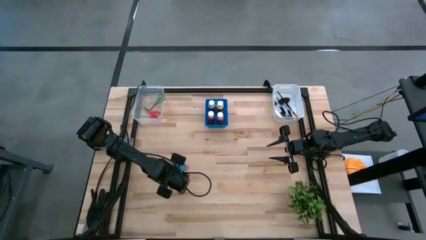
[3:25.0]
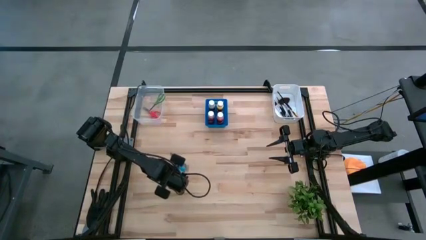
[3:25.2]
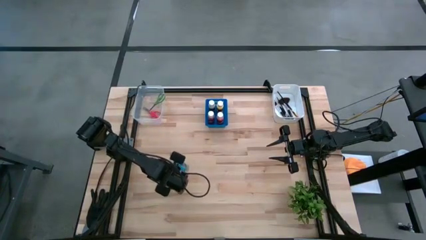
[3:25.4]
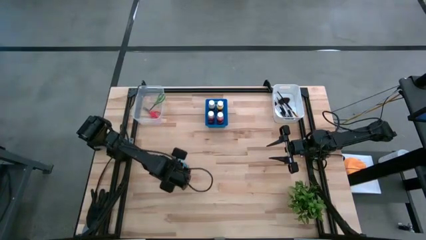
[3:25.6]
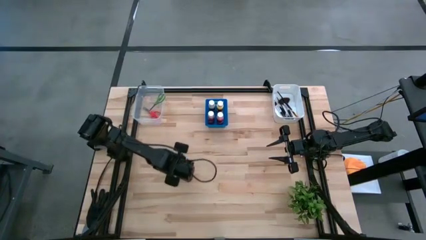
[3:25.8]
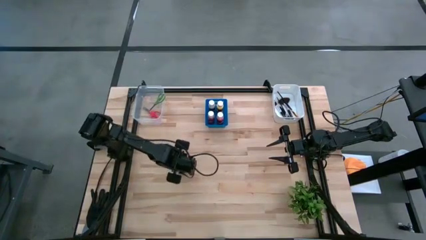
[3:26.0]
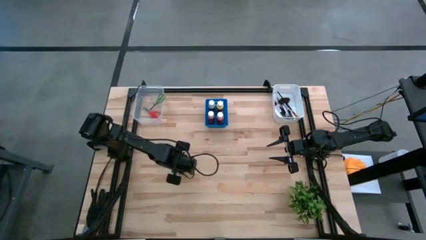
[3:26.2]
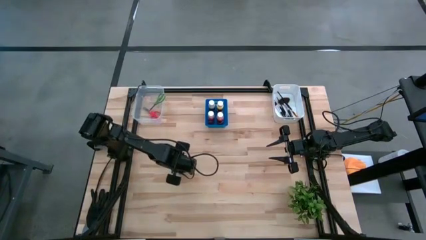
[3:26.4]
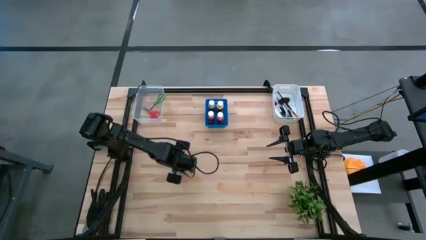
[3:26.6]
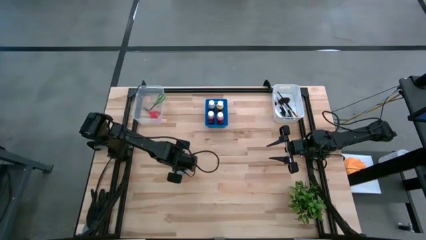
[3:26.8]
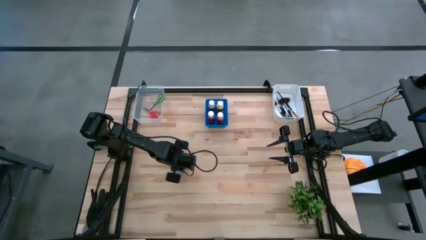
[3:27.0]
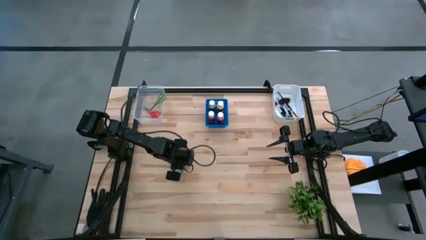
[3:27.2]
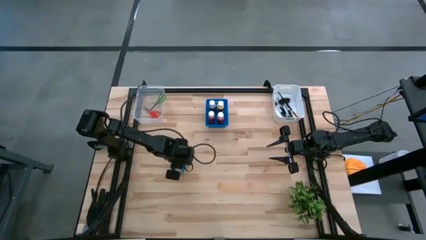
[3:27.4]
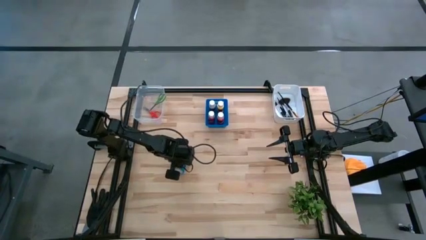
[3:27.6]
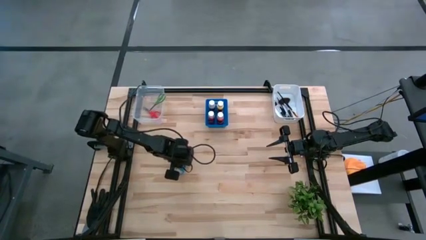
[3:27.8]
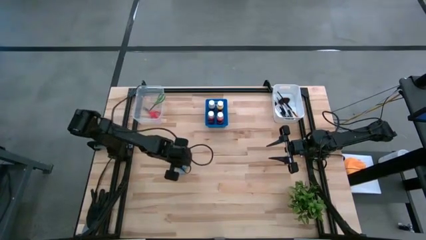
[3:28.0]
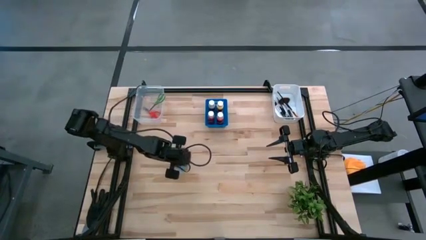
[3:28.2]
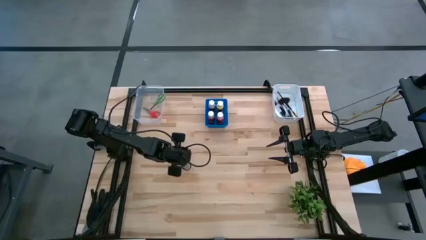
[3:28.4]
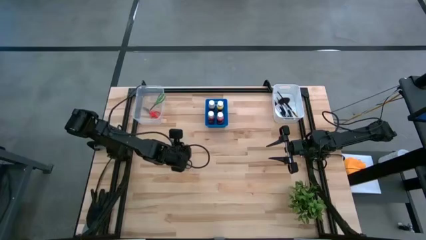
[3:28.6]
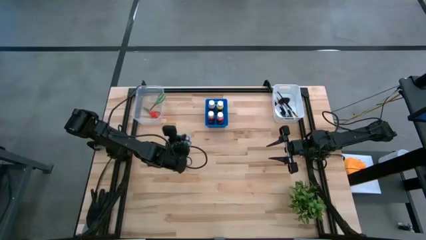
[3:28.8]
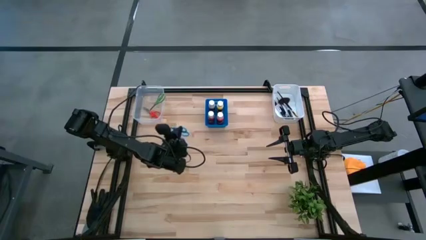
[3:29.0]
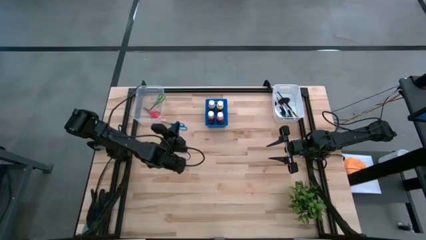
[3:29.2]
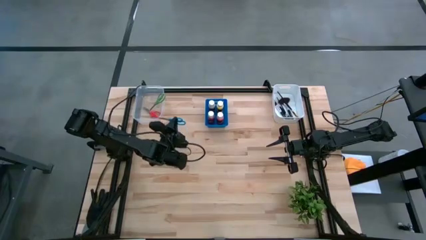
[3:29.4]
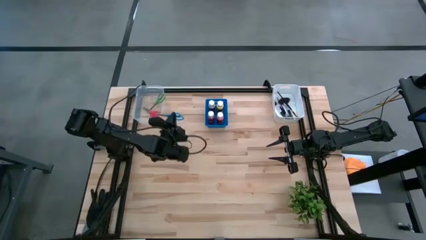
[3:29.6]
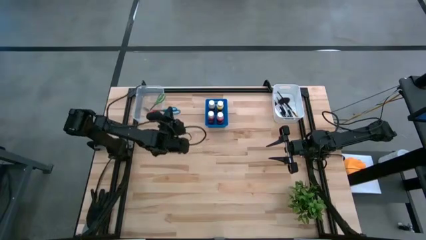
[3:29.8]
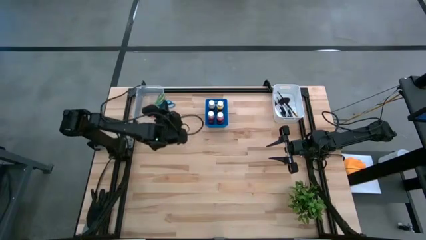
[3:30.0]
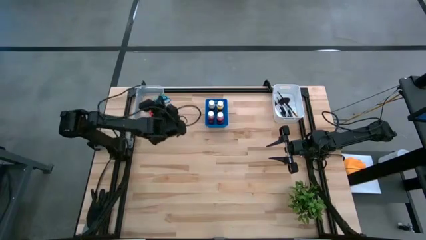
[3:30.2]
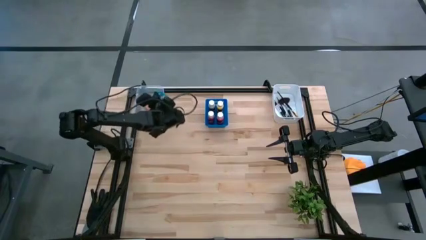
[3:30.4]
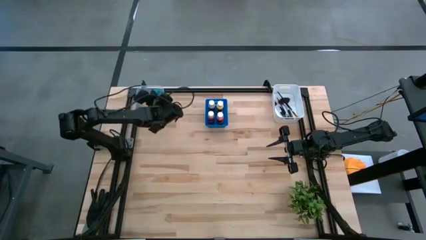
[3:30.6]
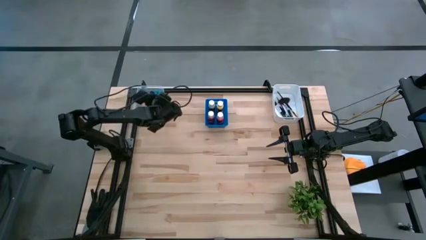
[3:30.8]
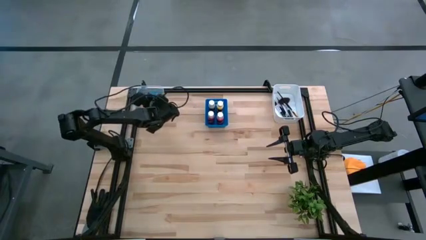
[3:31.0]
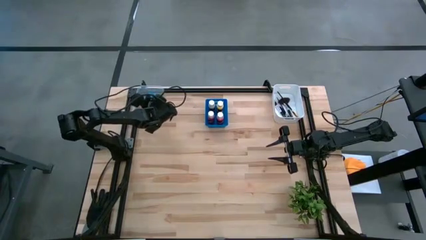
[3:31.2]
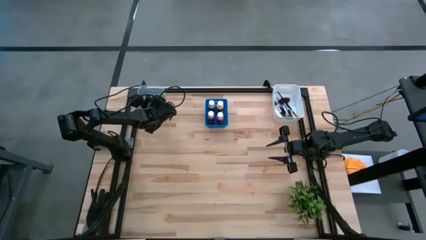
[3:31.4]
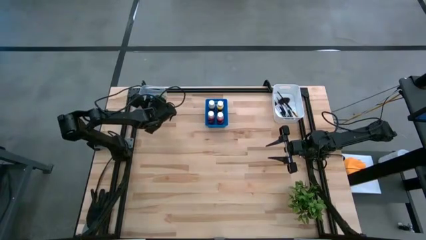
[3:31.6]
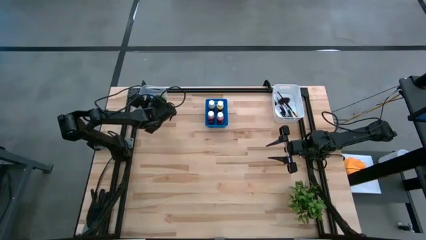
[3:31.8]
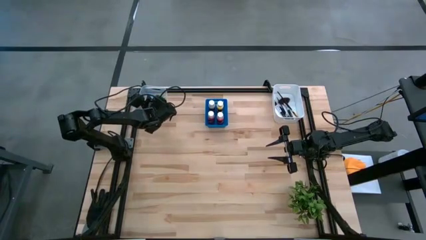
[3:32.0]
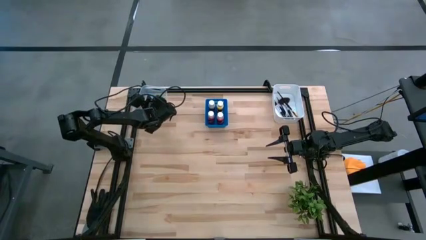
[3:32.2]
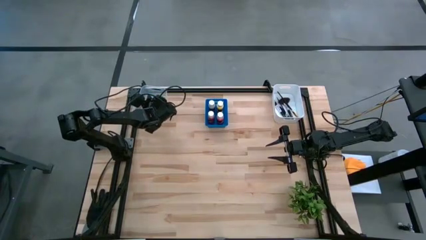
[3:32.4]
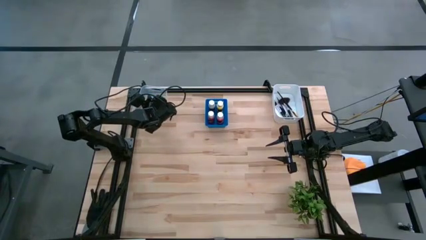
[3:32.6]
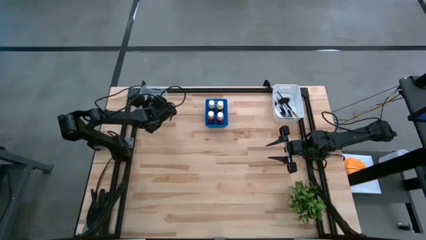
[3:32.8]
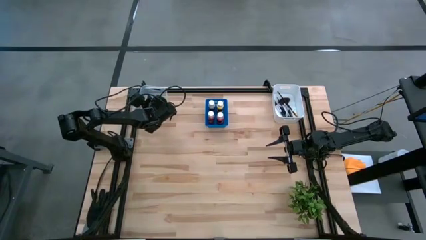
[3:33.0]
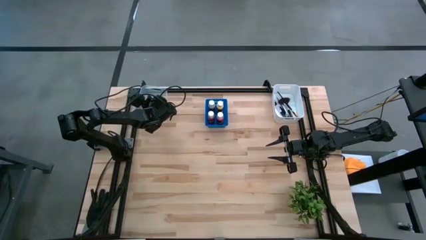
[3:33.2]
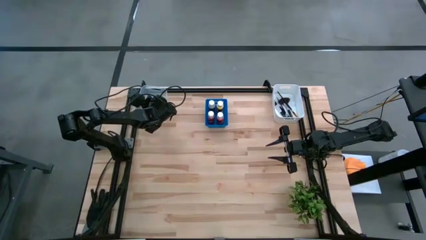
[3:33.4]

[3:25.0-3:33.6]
Task: Pick & Place Paint Supplies
Put the blue scissors into the transparent bin

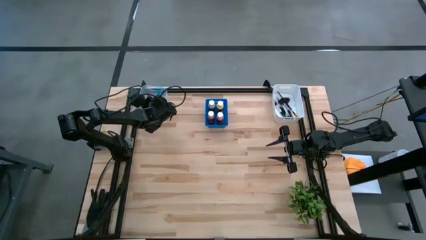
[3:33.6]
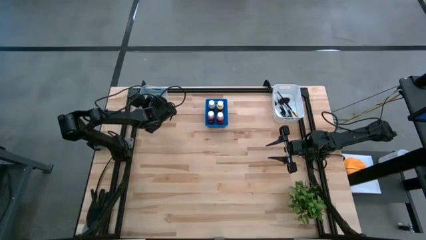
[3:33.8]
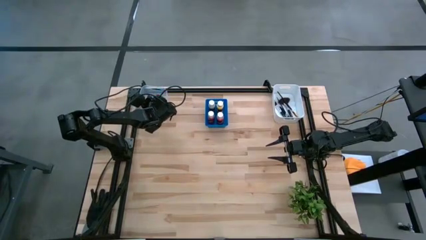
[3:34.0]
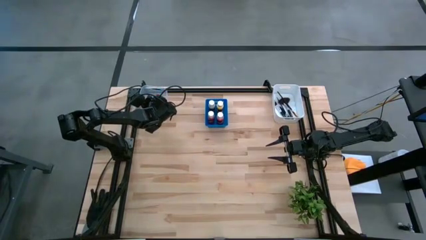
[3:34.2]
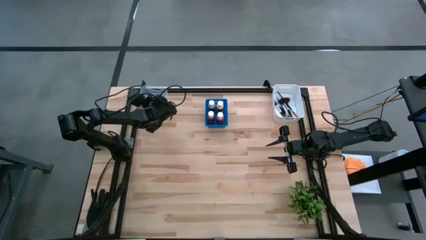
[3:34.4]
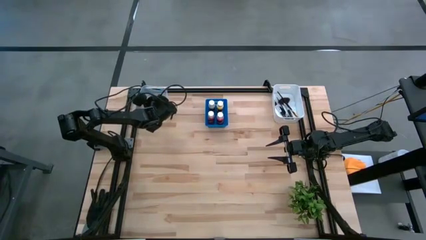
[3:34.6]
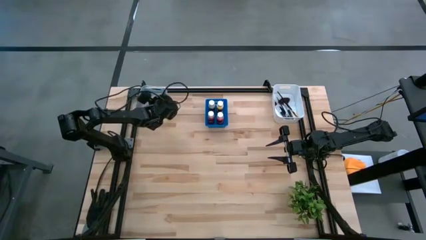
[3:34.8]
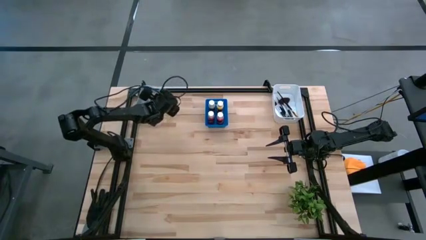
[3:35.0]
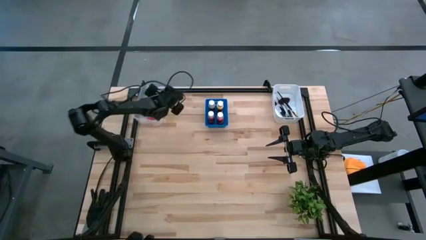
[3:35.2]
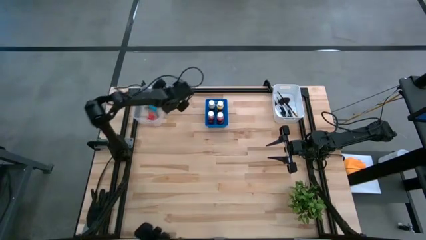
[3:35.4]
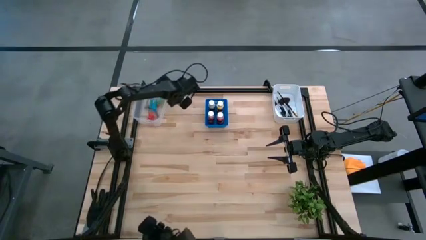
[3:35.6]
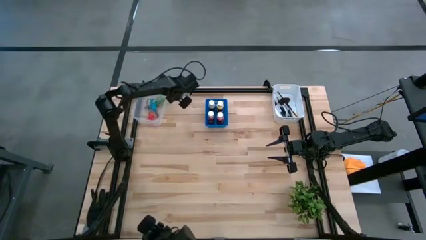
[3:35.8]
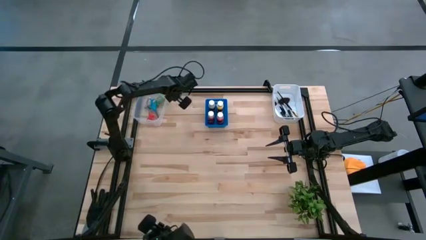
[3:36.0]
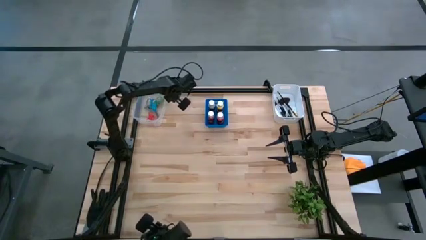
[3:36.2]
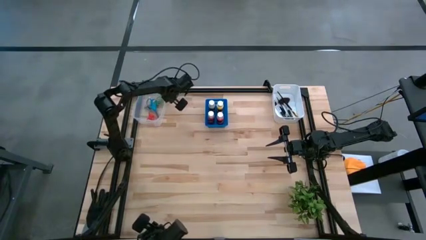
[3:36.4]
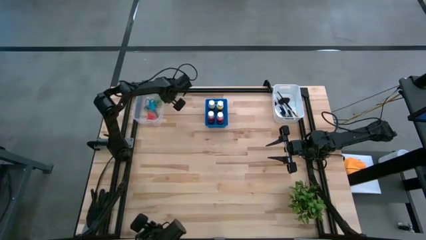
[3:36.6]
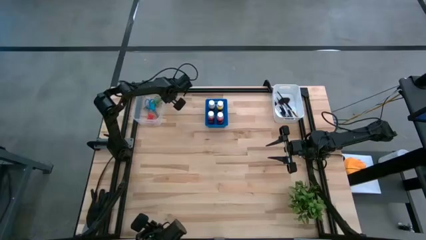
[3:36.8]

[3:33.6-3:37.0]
Adjust the transparent bin
